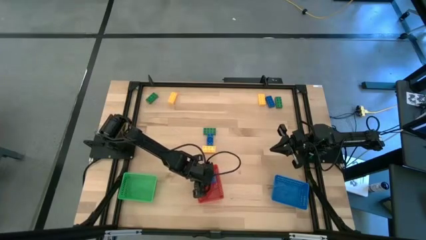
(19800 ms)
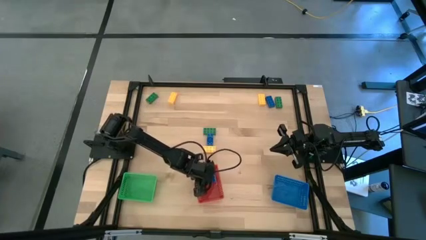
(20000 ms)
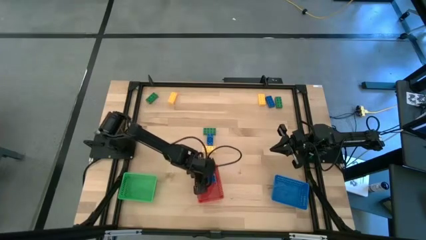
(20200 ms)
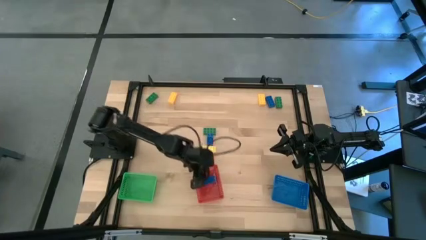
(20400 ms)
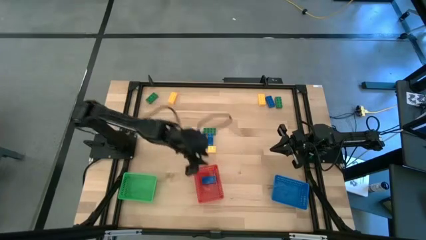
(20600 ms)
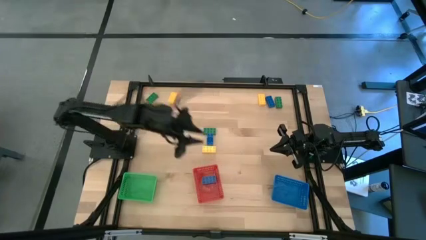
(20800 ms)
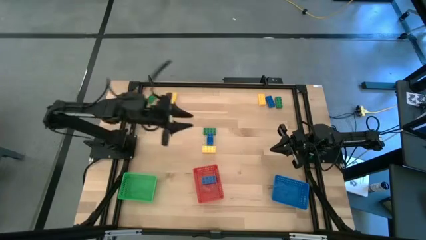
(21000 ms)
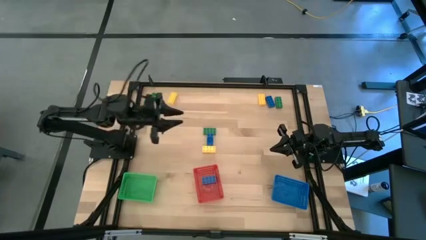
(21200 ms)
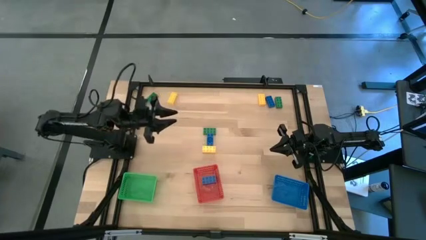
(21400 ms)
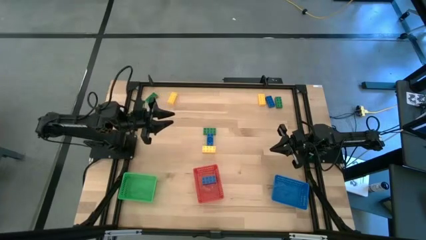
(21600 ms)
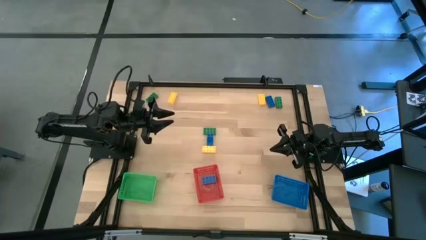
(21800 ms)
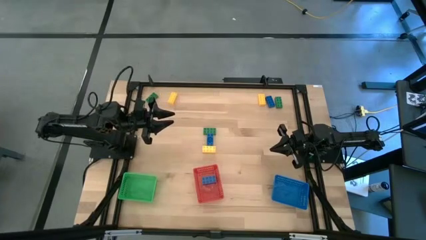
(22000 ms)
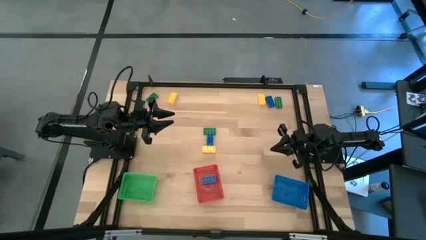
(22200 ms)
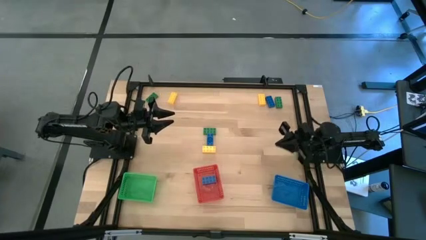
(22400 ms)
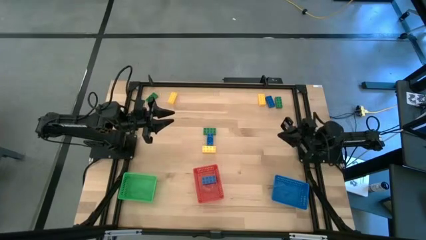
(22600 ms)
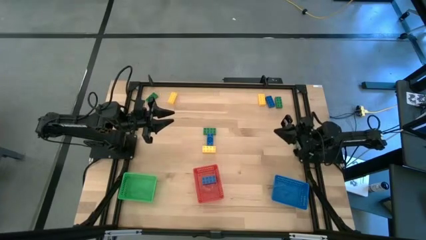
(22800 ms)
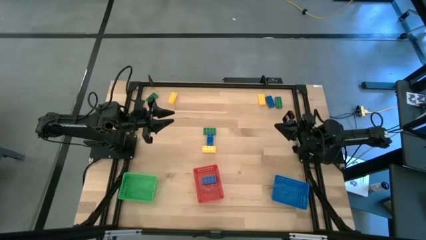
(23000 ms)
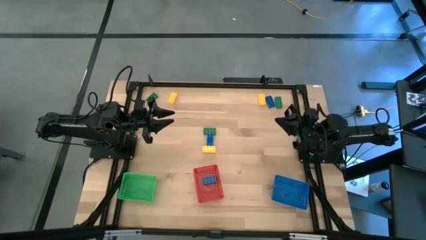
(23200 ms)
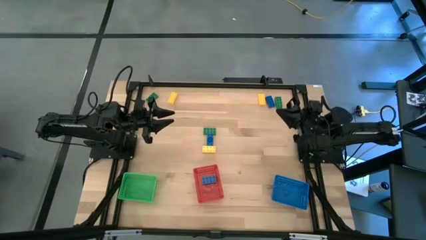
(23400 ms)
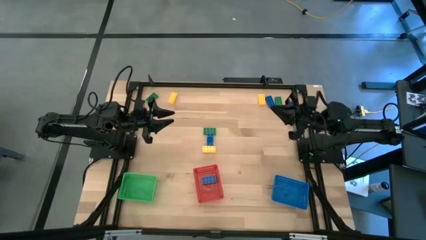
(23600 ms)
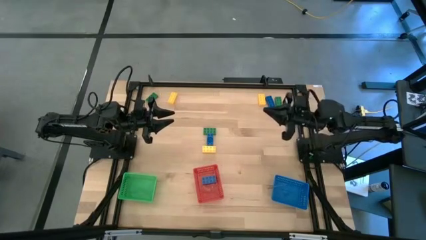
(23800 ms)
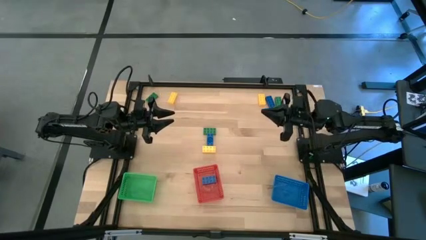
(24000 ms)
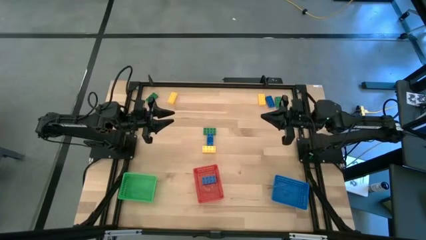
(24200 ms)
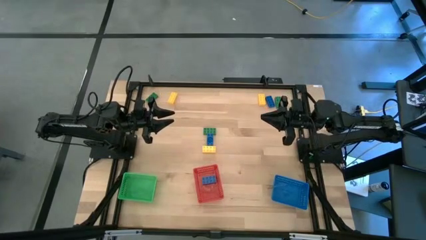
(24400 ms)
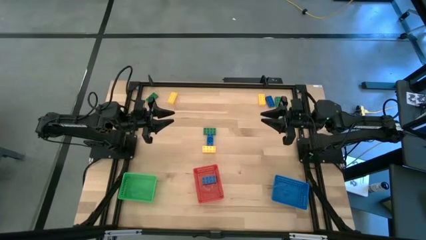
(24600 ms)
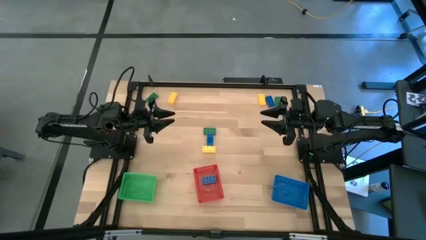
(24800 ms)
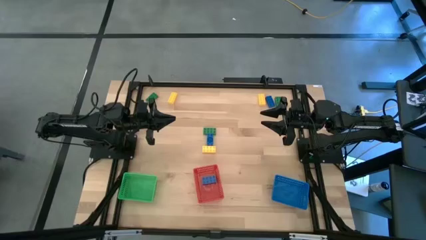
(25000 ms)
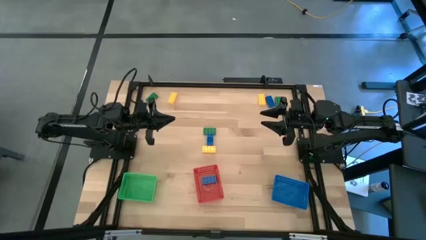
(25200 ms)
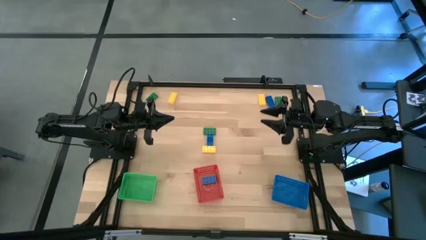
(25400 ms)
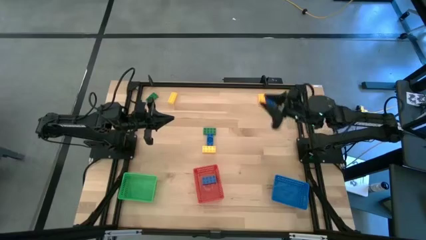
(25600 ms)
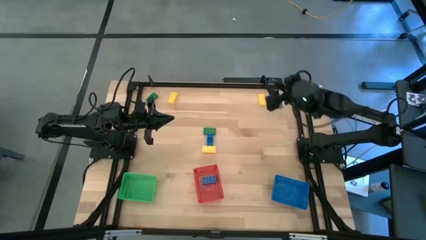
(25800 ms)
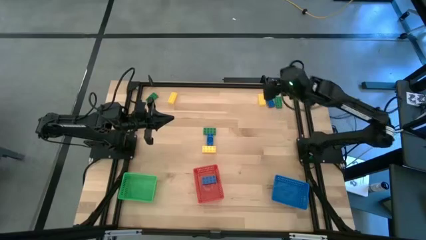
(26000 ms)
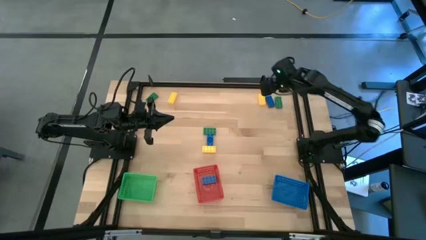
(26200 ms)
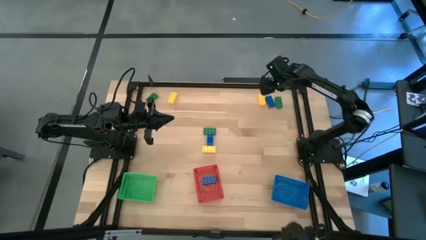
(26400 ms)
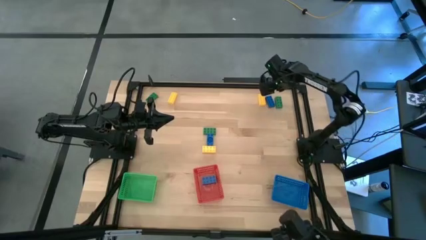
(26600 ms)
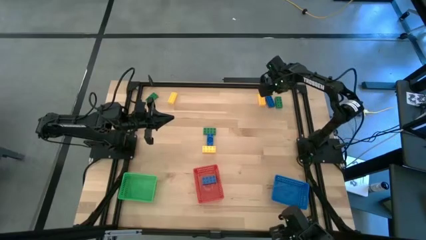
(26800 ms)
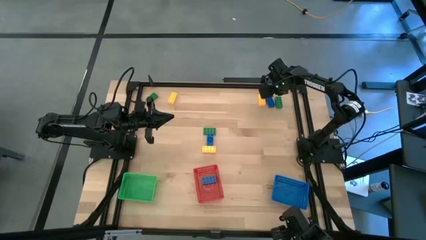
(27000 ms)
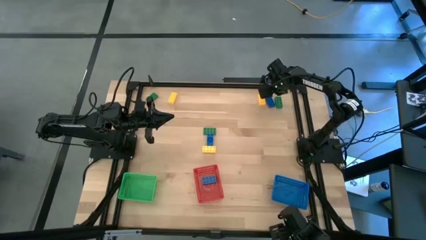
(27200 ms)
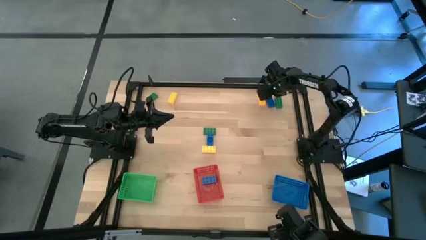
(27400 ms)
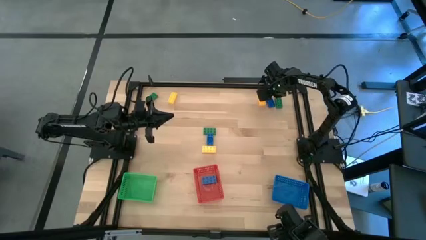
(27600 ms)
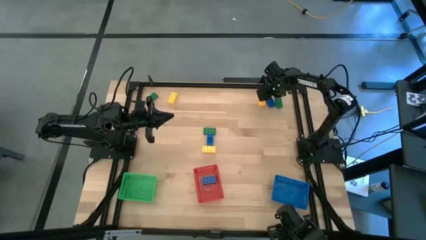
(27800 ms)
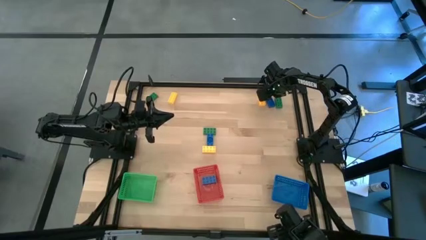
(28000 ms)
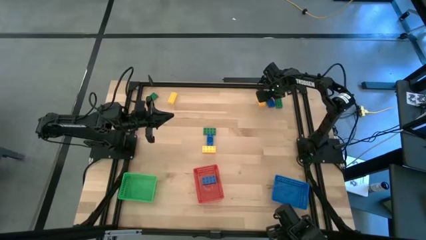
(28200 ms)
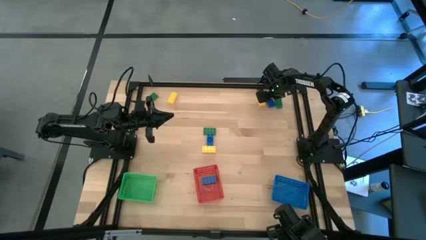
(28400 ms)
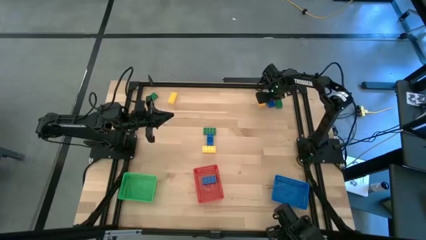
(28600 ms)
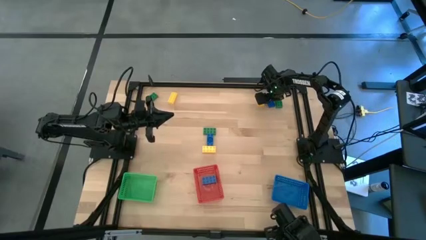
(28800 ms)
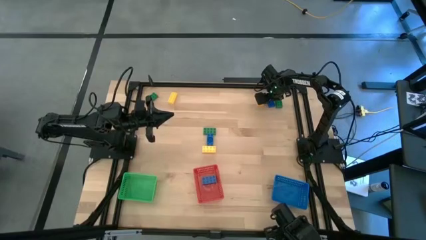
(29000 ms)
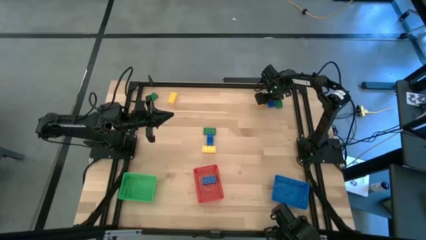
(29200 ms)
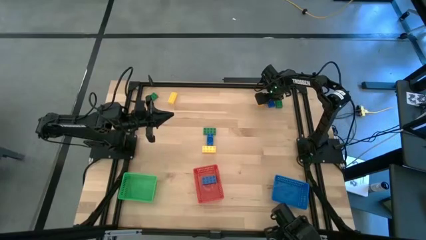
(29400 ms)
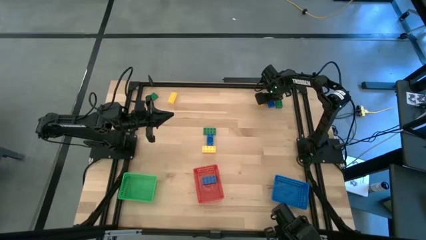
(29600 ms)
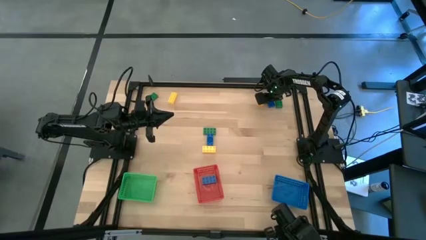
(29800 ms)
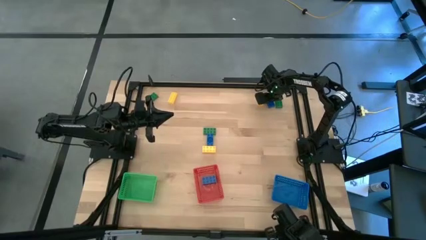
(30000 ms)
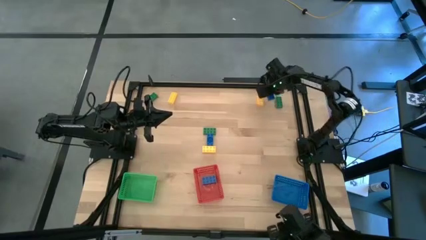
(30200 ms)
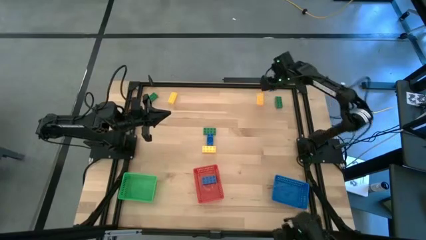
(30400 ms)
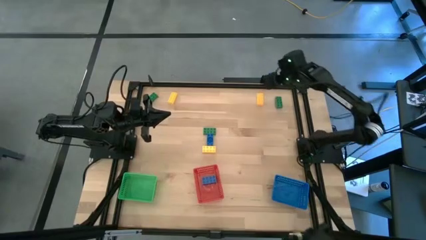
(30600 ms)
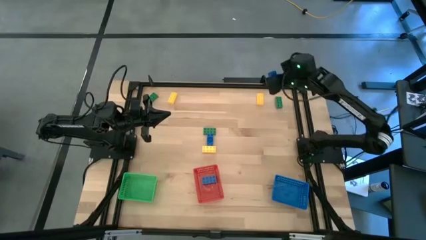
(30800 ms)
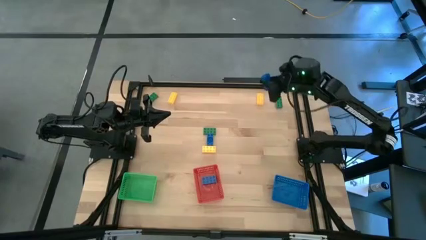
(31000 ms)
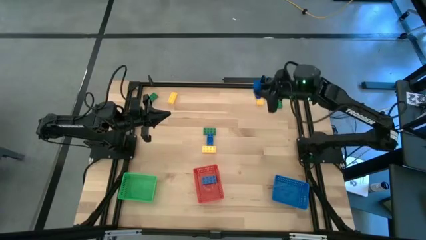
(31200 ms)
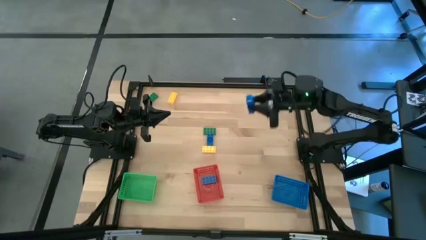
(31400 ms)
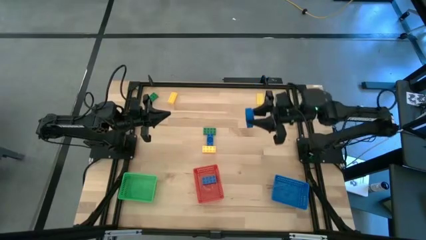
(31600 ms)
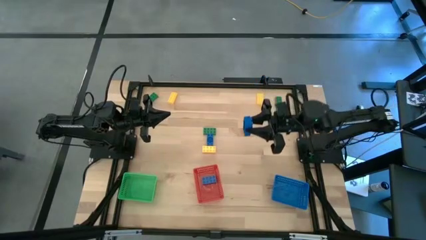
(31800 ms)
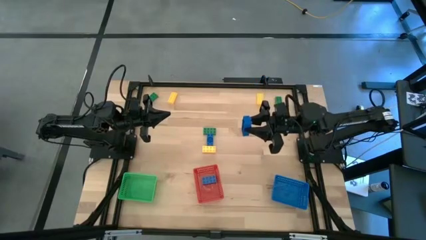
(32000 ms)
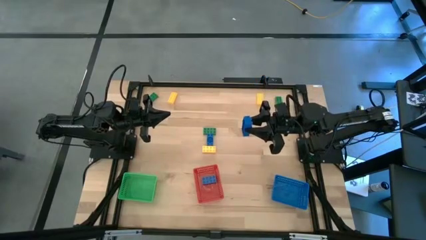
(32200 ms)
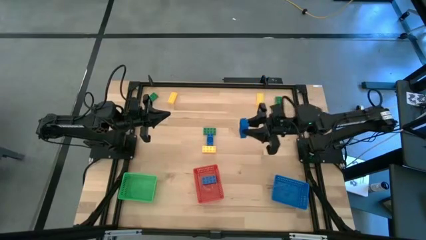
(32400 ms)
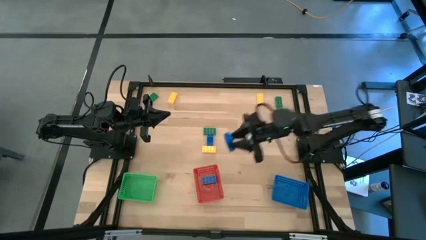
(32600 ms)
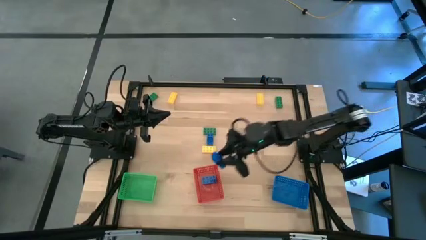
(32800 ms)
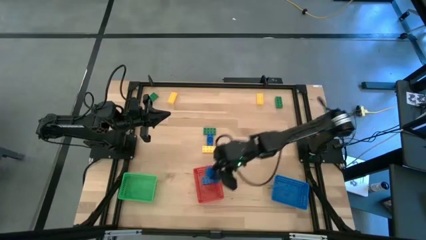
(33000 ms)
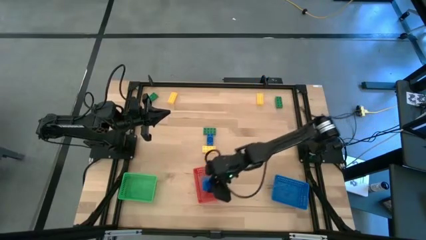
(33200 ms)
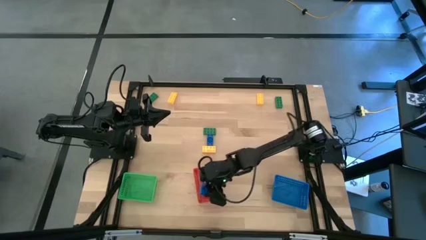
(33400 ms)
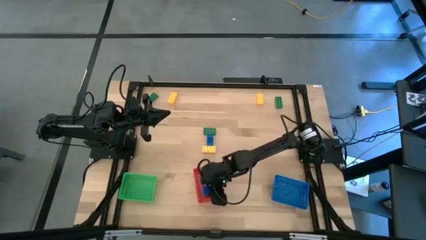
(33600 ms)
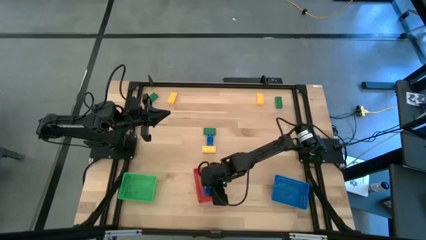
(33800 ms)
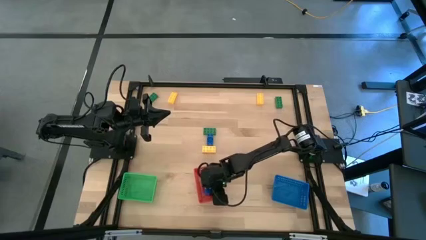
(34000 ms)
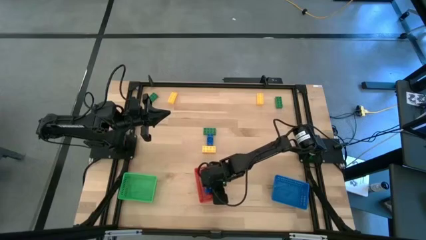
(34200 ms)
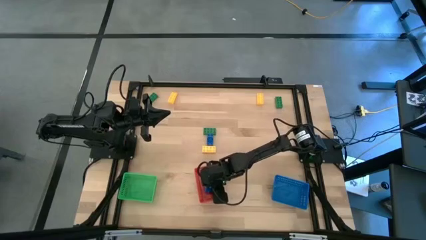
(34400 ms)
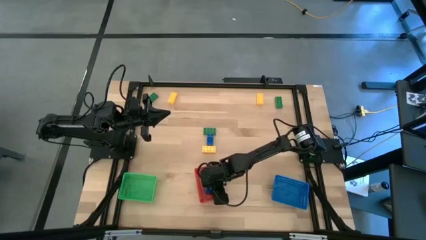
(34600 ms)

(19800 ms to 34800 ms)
Task: Sort & place blocks by color
Put the top blue game piece into the red bin
